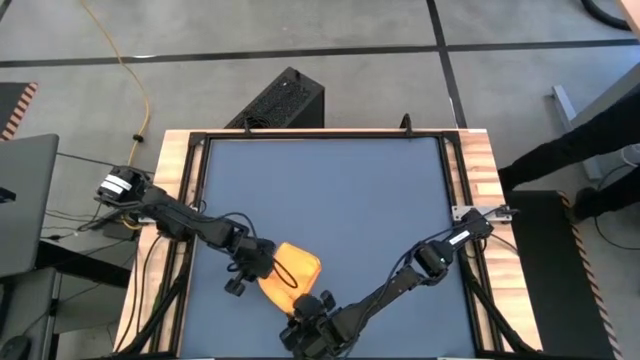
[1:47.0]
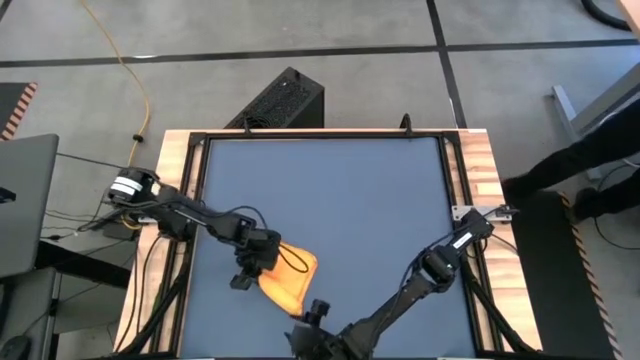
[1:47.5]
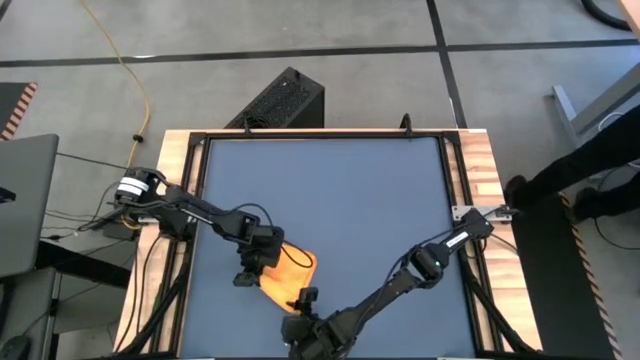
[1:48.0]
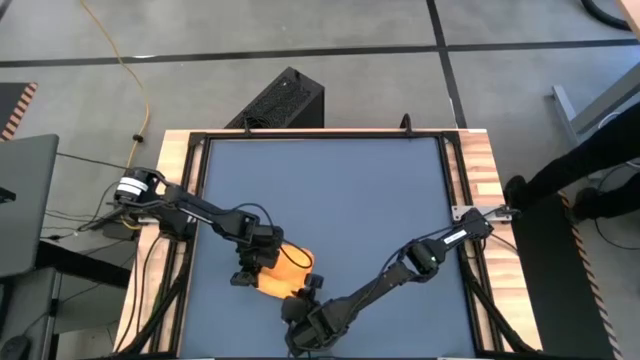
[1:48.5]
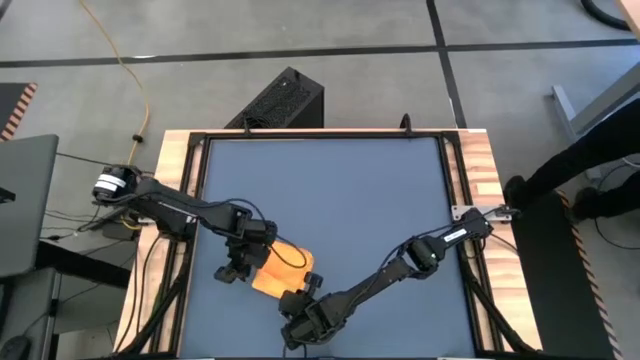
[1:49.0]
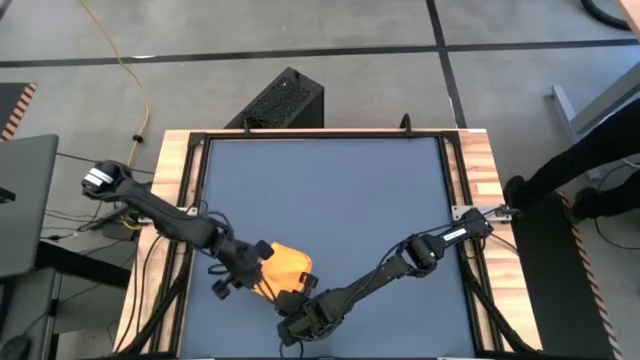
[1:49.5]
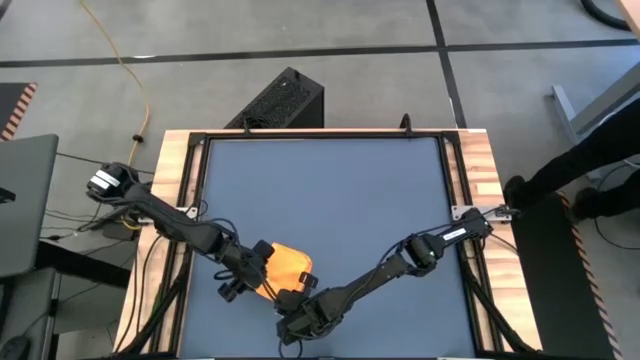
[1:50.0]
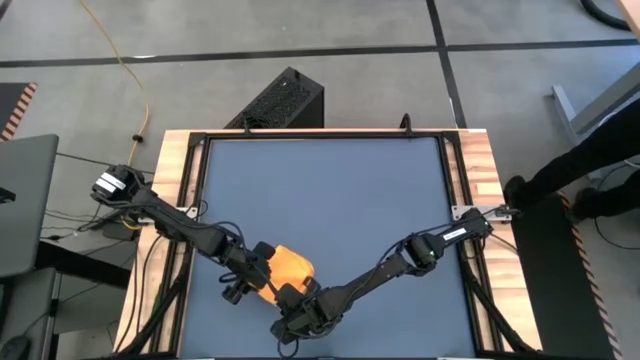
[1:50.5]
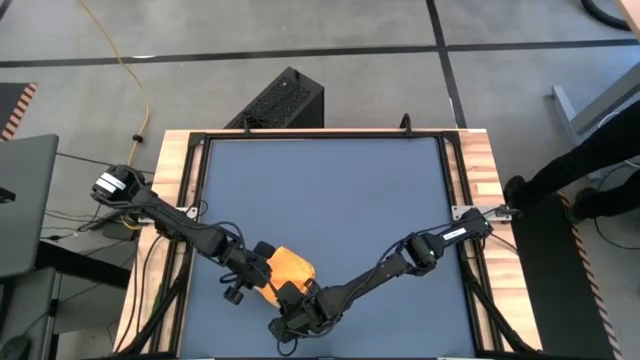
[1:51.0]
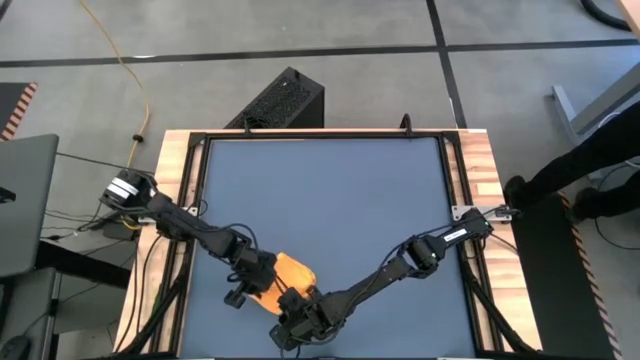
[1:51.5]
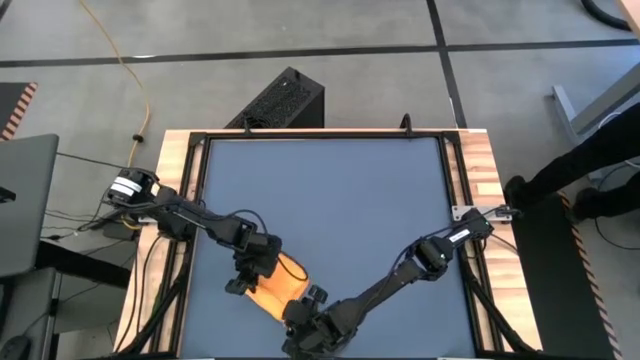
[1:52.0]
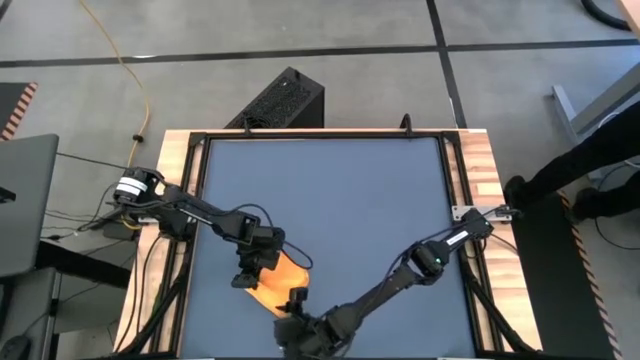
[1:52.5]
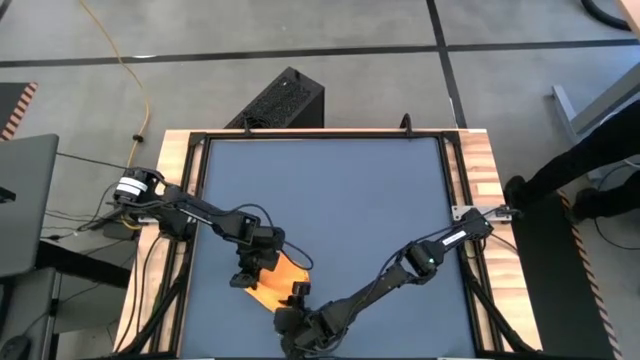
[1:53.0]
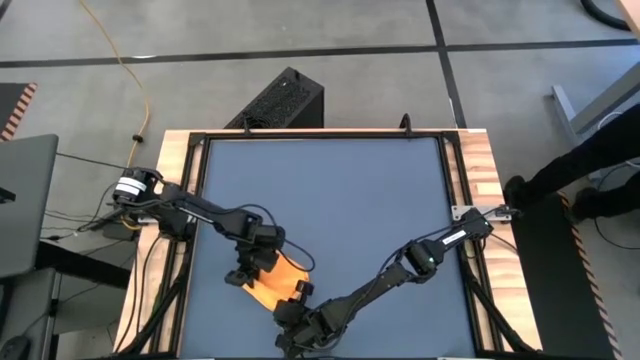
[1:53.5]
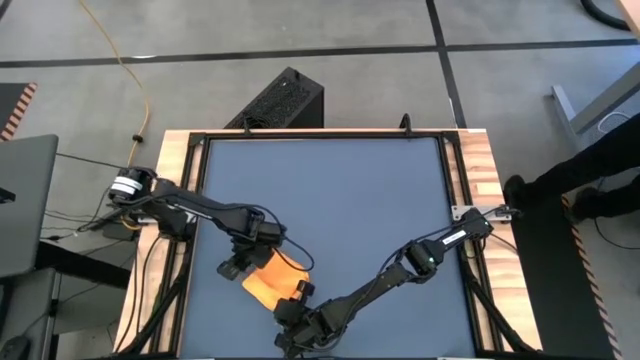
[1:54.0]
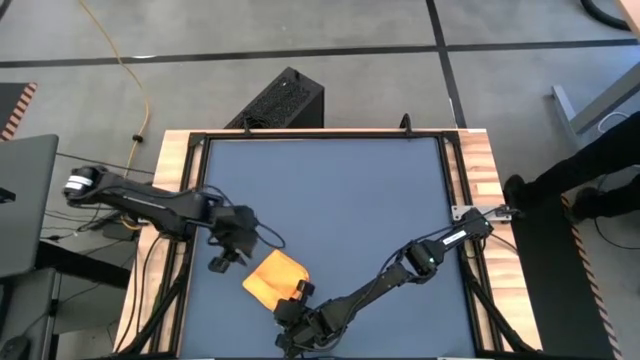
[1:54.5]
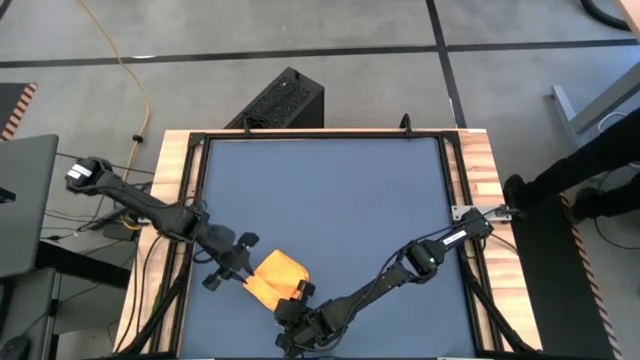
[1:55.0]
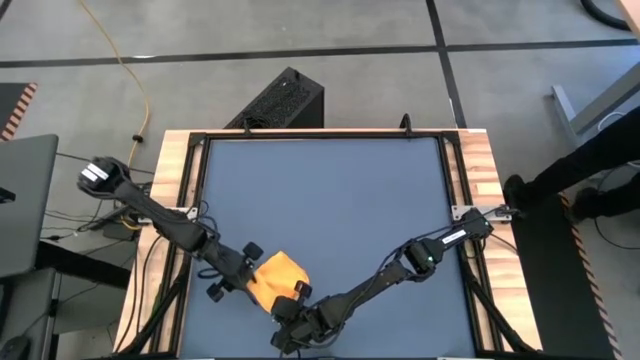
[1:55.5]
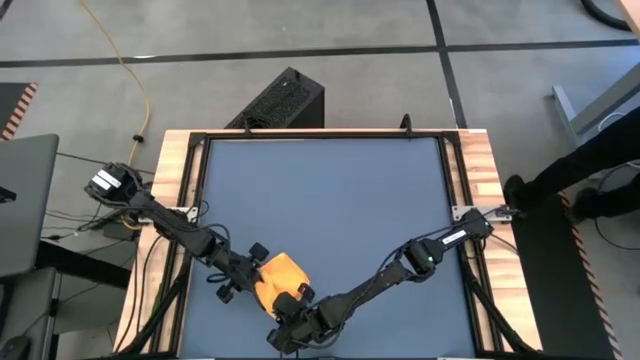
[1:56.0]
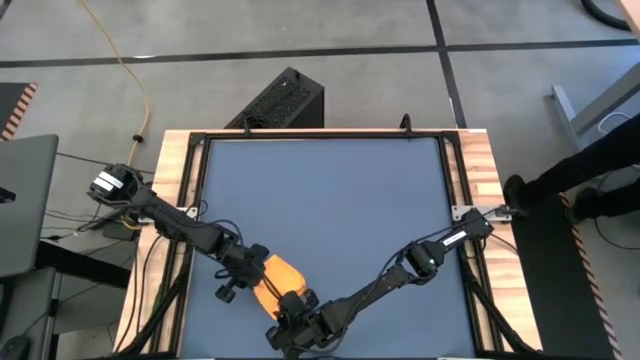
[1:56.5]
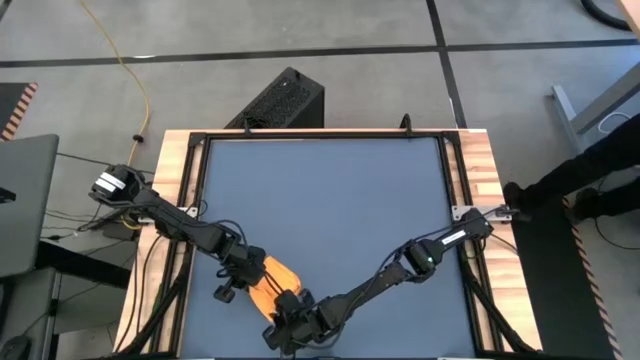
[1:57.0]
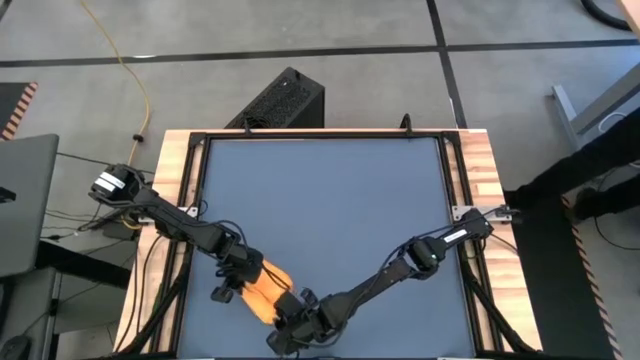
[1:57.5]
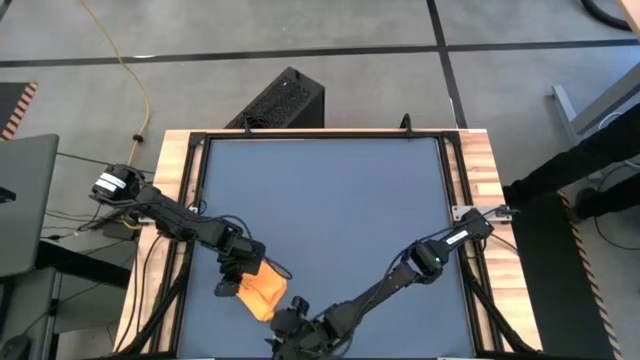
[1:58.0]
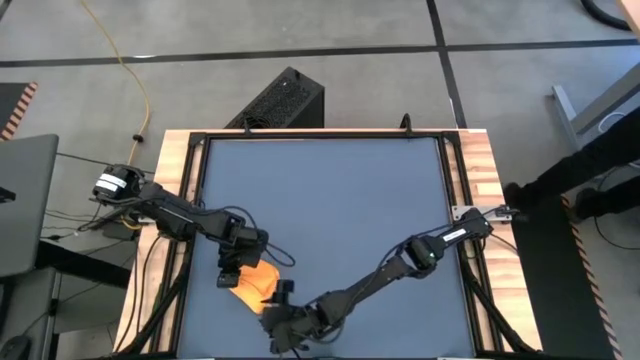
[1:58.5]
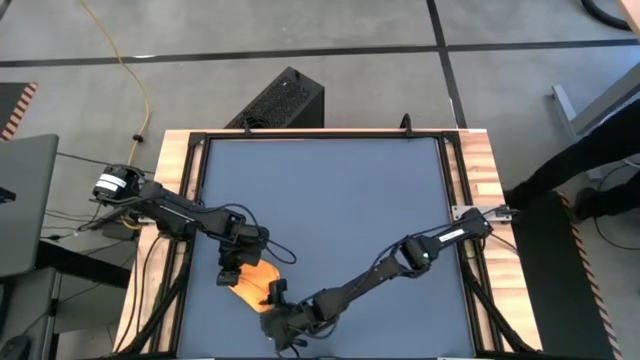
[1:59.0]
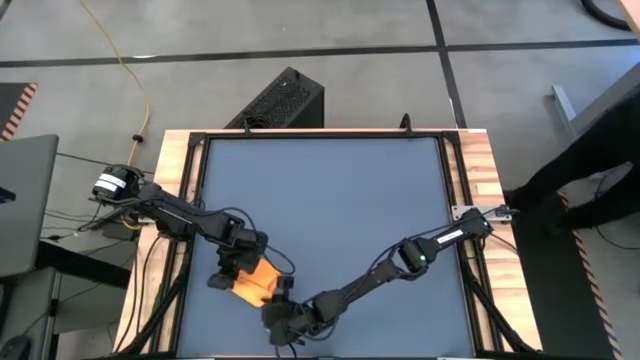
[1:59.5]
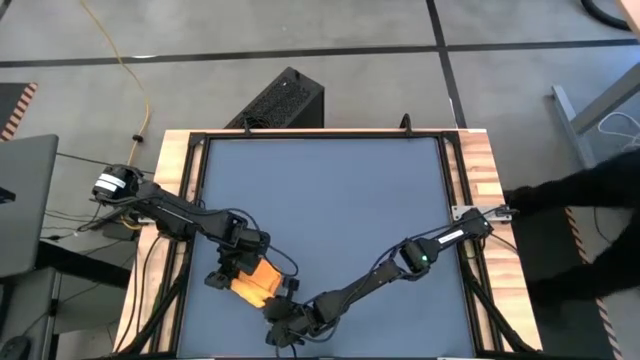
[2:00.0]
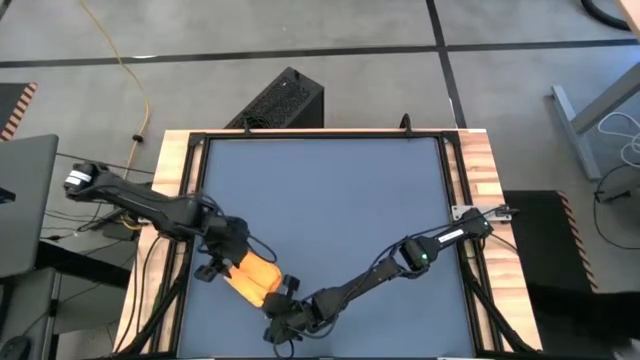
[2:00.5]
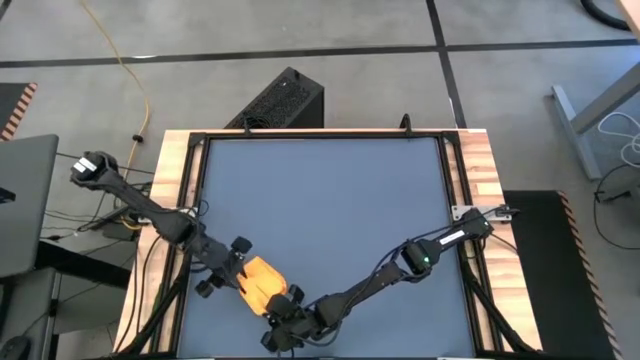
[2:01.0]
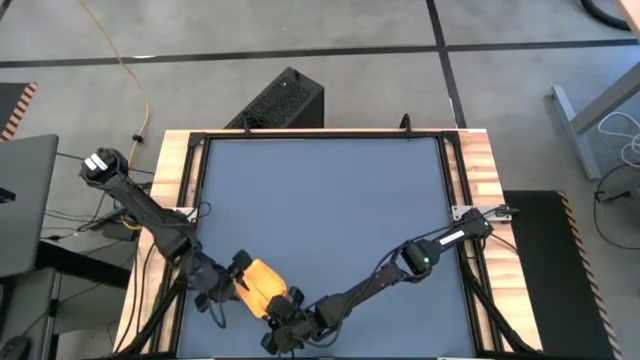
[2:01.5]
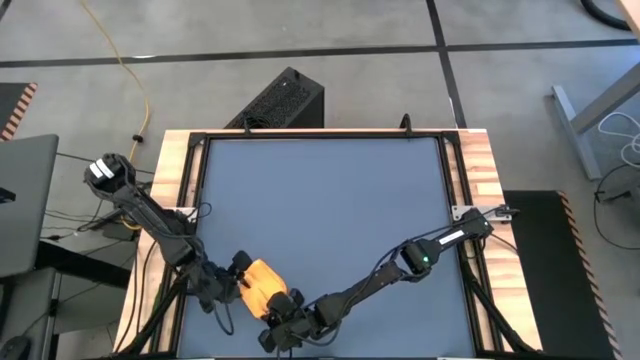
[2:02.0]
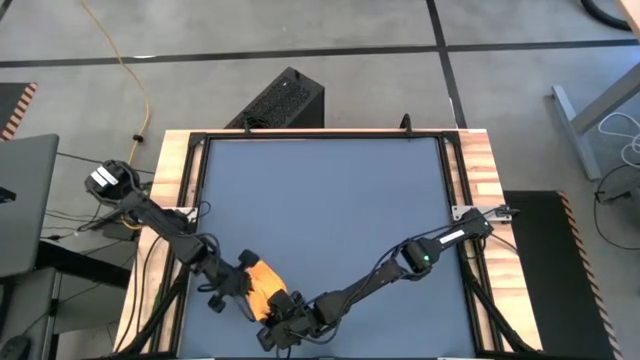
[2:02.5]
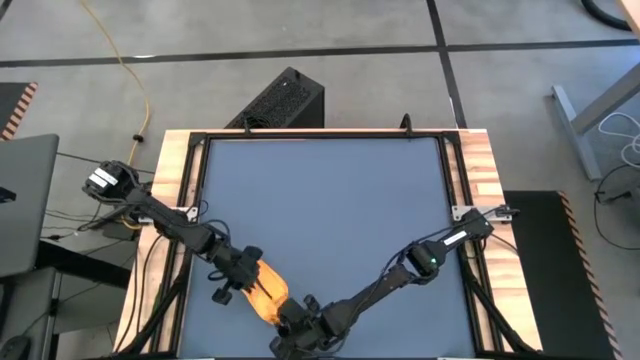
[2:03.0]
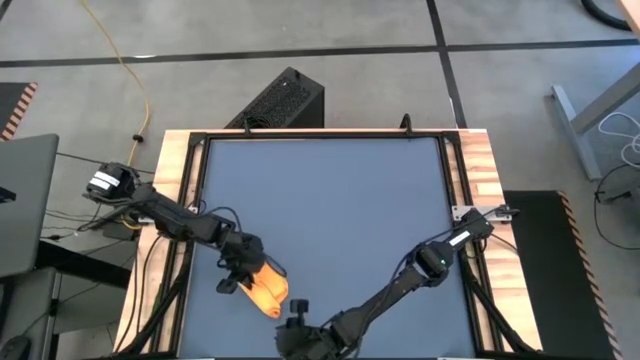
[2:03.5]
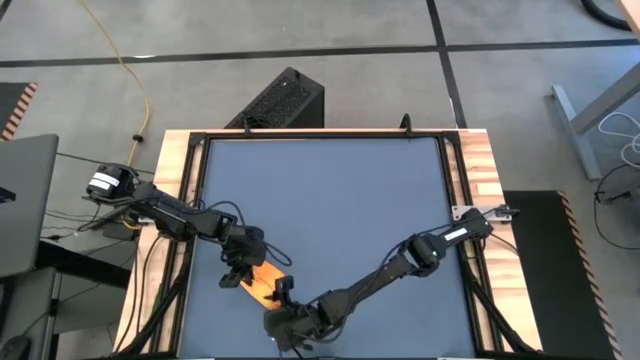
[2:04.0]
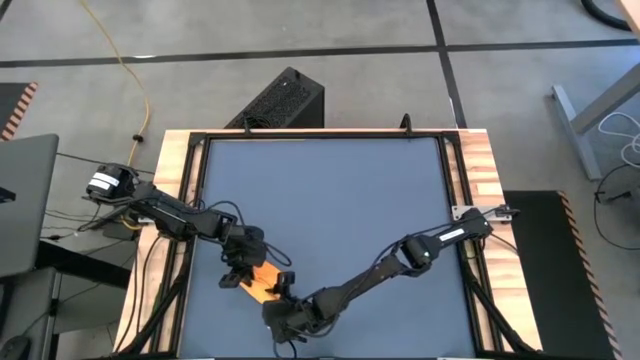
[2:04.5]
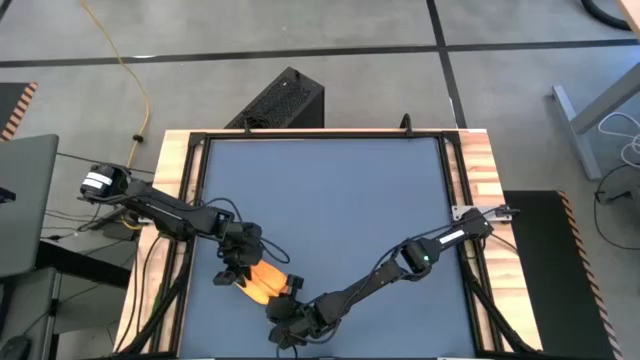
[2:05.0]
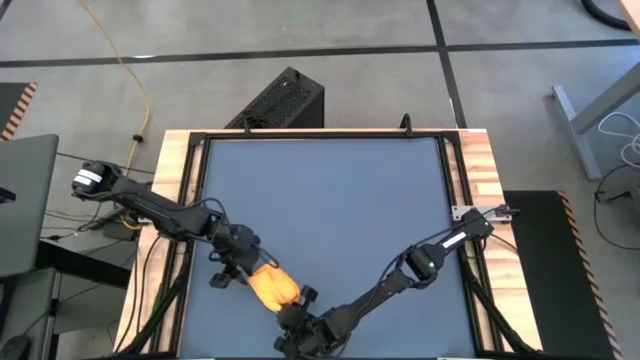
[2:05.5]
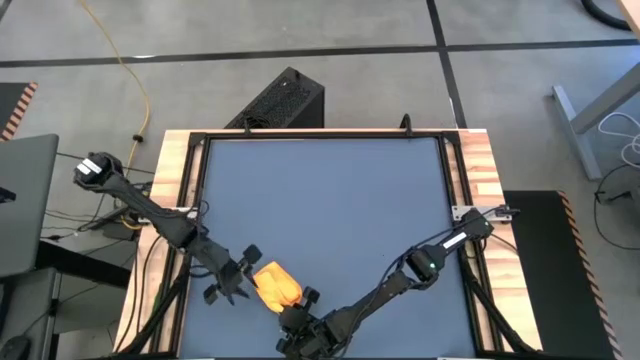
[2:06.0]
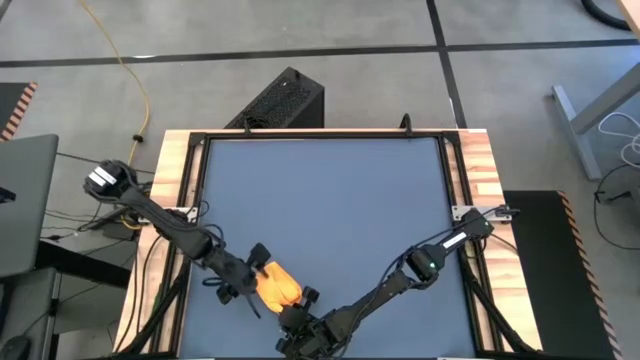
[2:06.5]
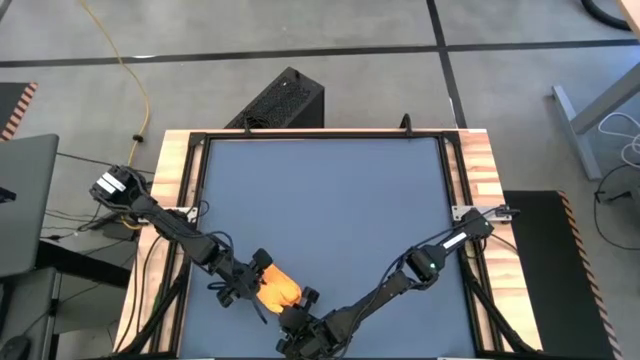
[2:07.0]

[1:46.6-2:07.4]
Task: Roll towel
Roll the orange microfiber towel

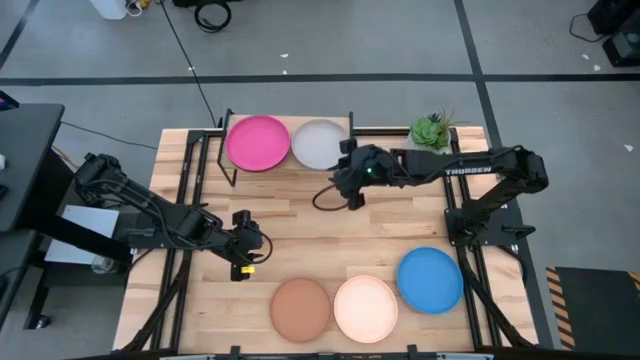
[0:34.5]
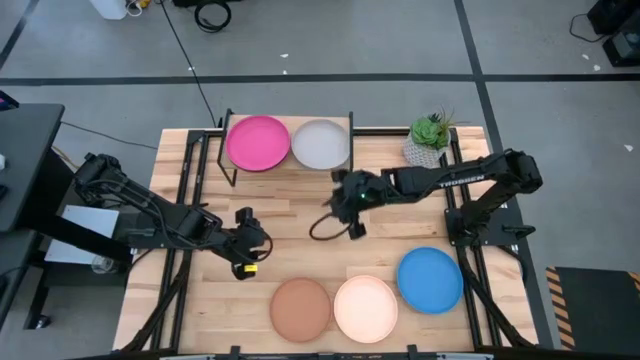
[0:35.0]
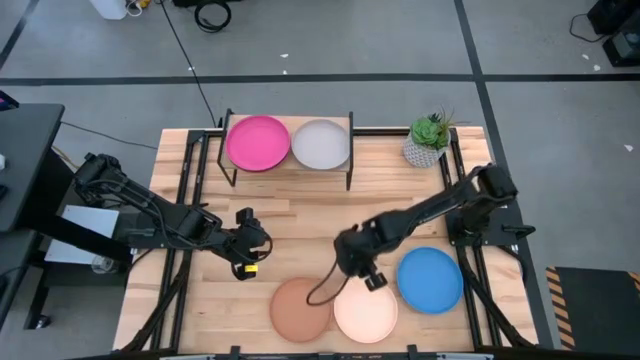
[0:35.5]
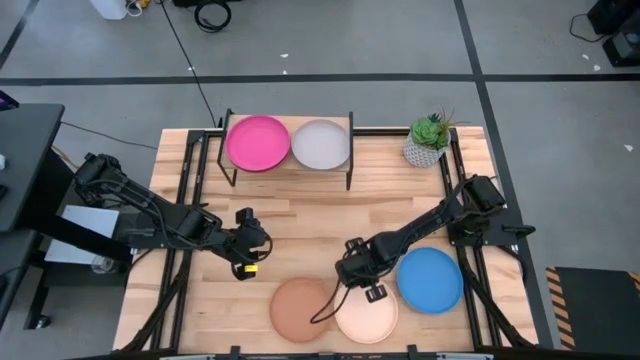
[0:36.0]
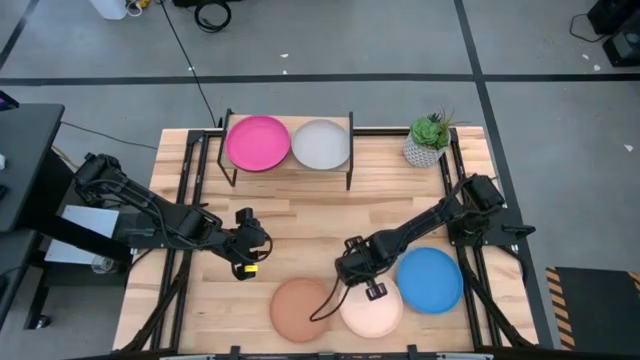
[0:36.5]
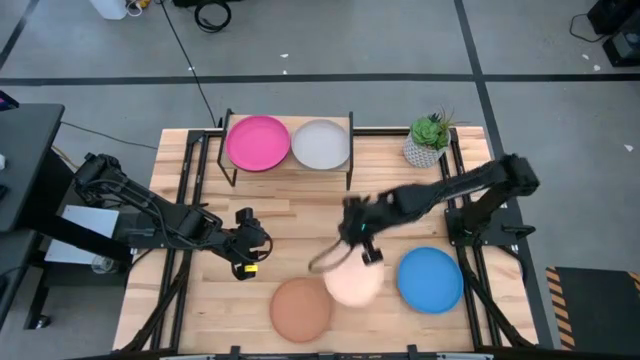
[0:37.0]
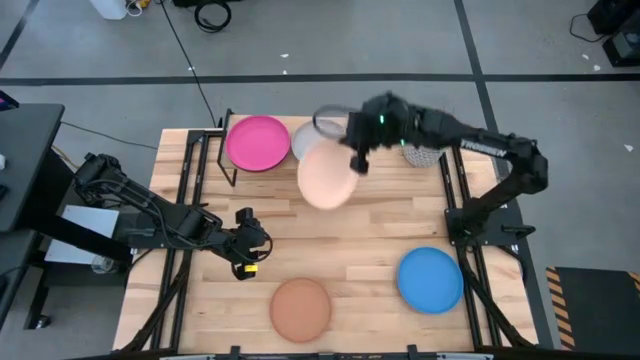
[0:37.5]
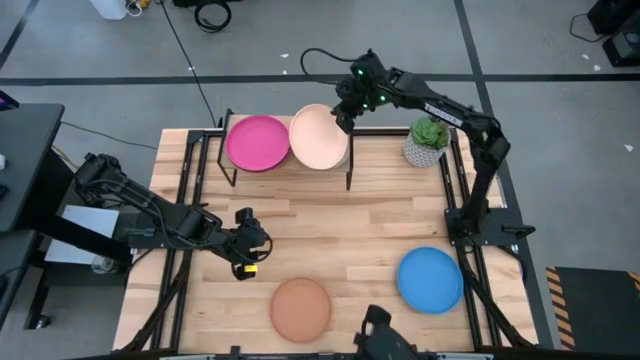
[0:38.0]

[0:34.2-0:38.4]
Task: Place and stack plates onto a shelf
Stack the white plate on the top of the gray plate
